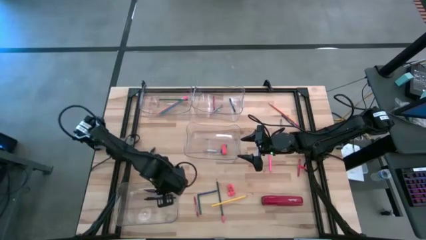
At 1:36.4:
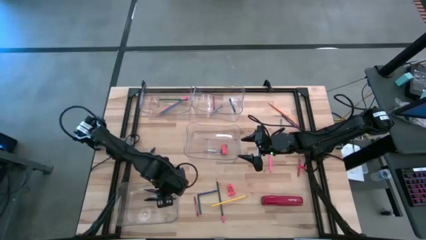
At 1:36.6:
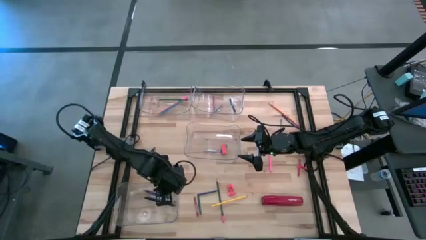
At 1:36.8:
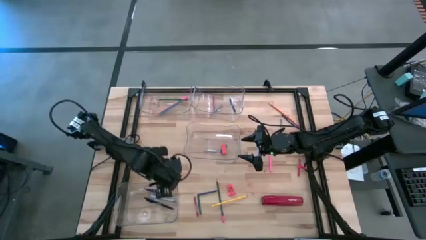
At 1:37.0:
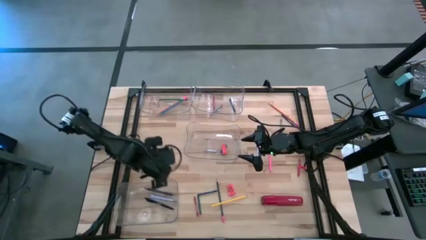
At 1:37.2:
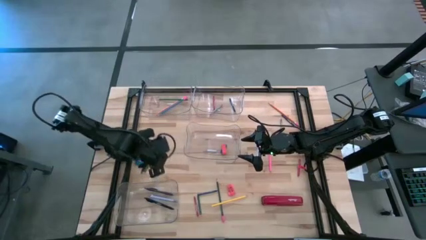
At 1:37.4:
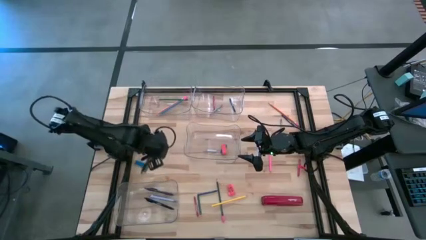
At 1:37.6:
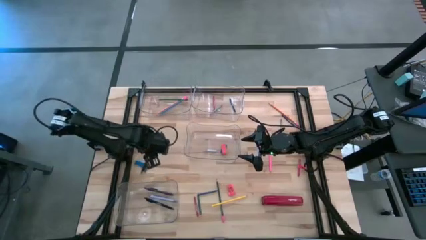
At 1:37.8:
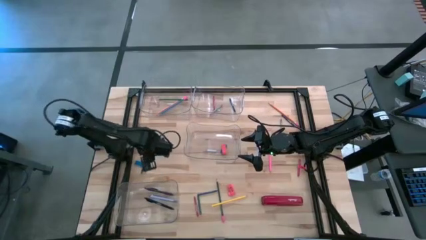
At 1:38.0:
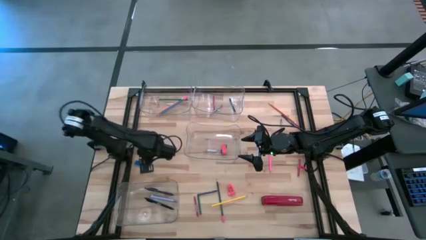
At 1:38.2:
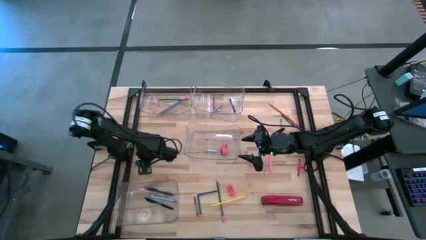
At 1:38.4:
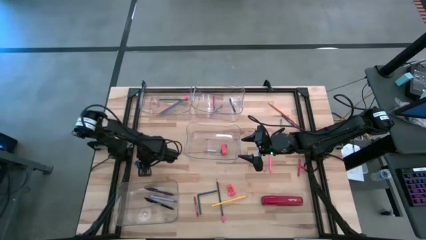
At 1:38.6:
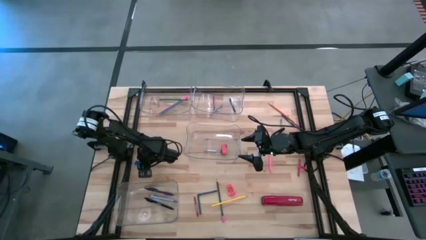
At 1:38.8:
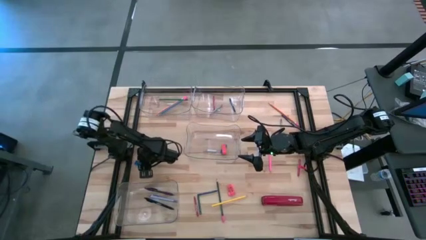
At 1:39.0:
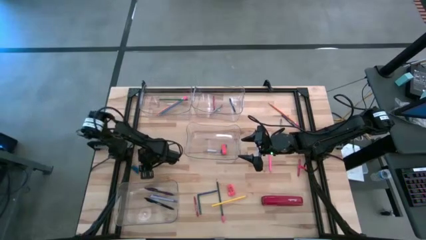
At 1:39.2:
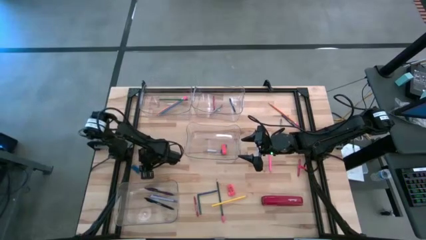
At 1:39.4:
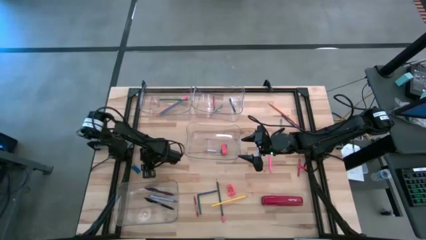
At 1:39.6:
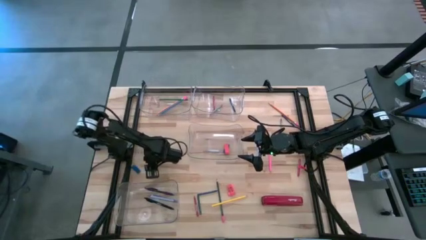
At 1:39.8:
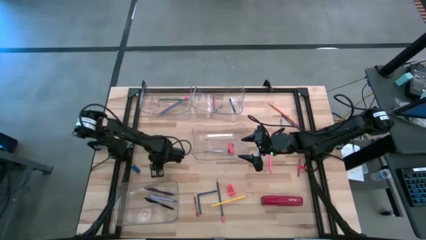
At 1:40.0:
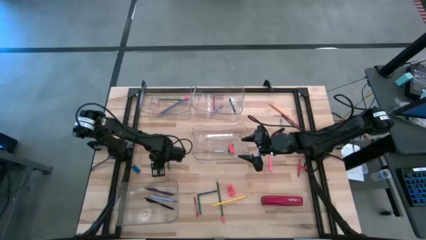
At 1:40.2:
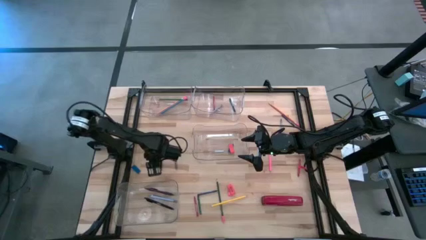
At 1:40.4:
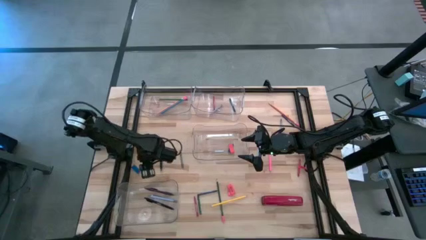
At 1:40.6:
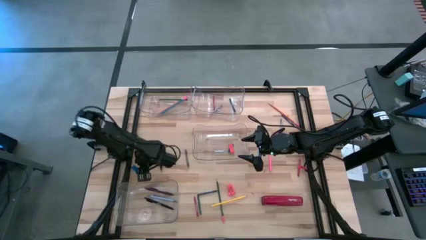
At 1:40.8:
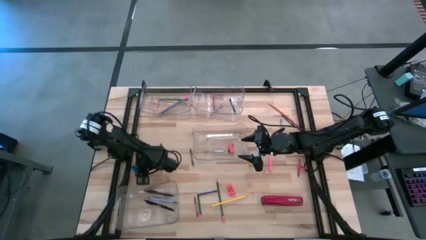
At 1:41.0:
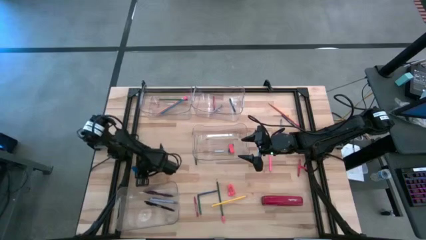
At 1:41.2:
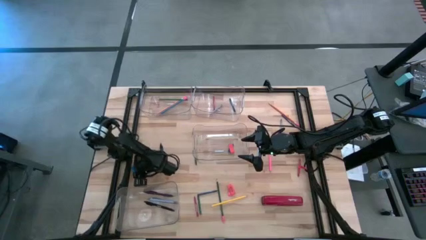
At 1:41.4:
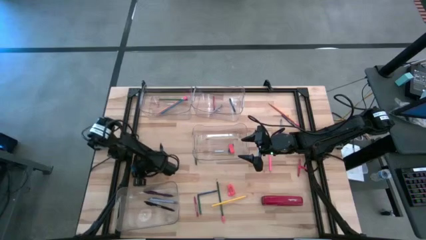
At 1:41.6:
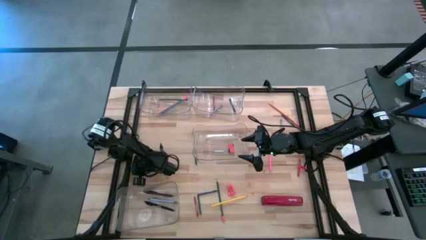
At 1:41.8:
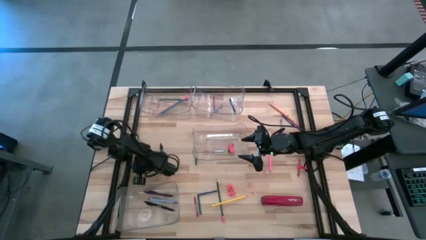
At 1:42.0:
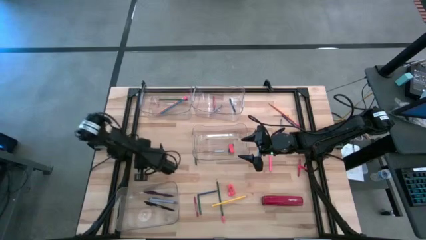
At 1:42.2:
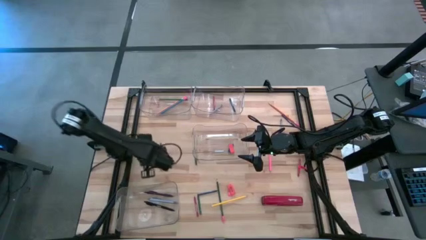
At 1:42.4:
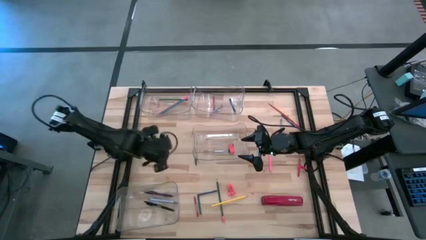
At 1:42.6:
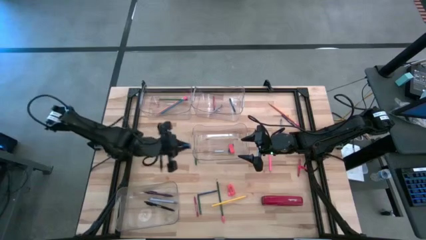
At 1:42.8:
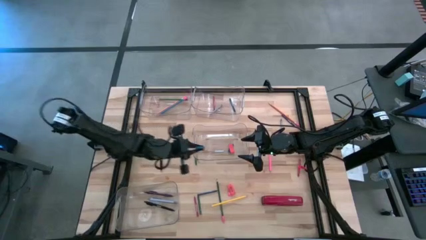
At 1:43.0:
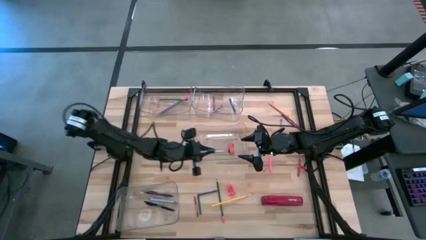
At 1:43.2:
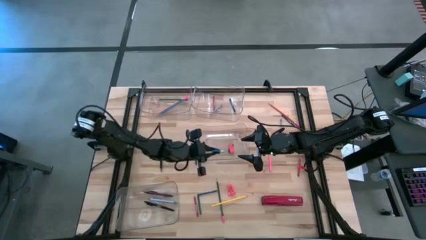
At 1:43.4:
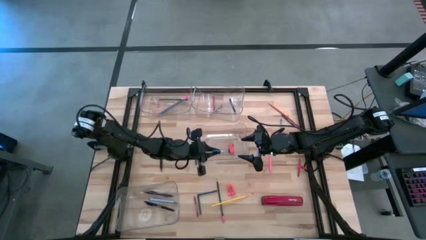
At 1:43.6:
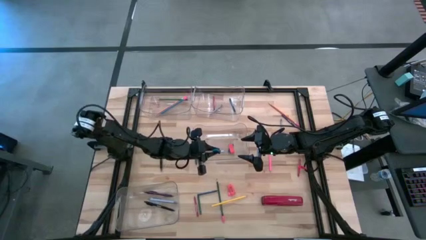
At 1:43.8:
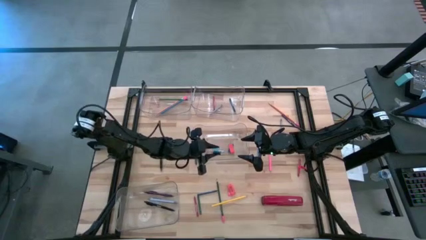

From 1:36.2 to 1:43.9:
Task: Sort crayons/erasers/pens/pencils in bins
Put the blue eraser into the middle transparent bin

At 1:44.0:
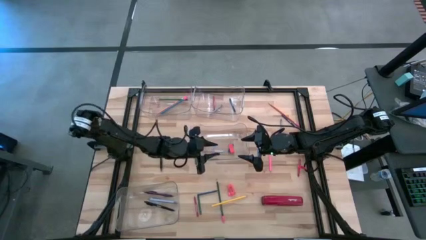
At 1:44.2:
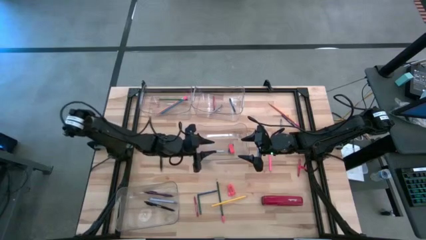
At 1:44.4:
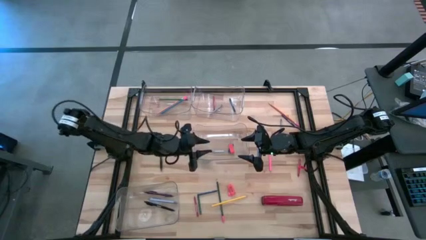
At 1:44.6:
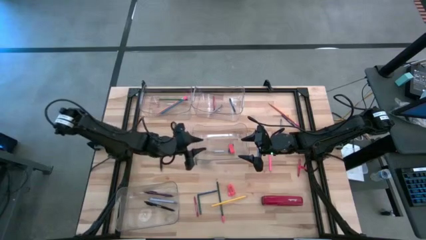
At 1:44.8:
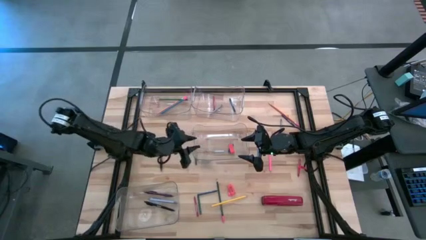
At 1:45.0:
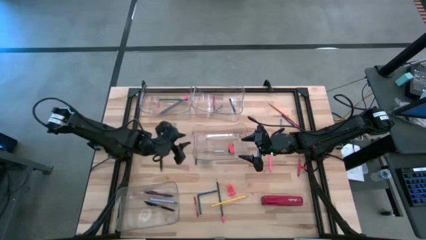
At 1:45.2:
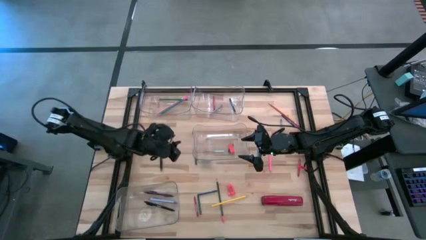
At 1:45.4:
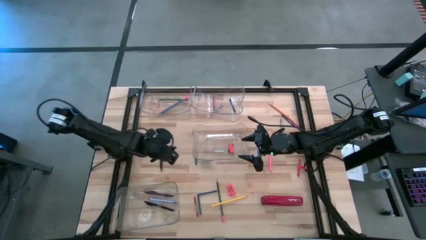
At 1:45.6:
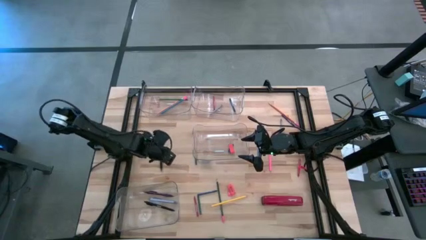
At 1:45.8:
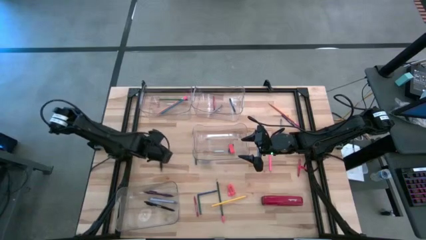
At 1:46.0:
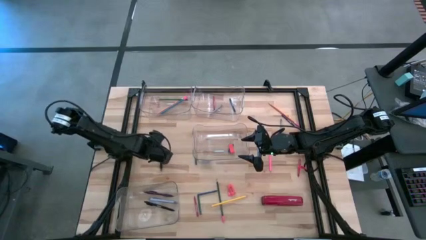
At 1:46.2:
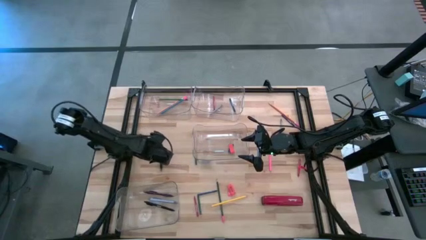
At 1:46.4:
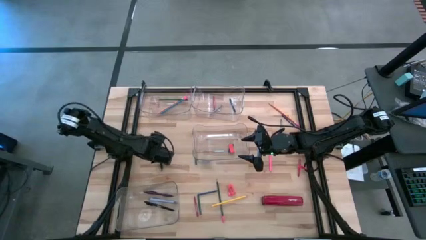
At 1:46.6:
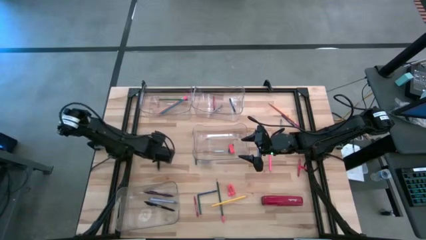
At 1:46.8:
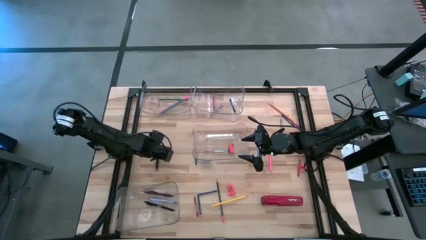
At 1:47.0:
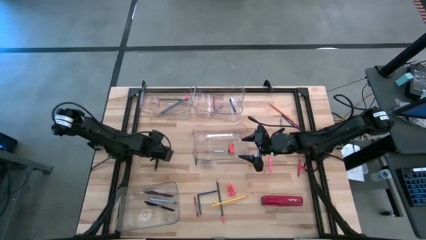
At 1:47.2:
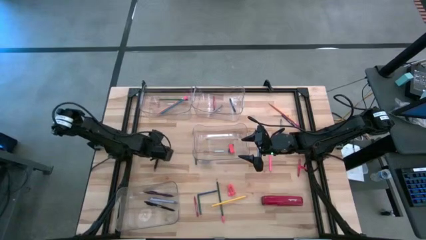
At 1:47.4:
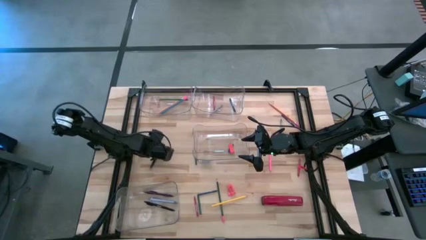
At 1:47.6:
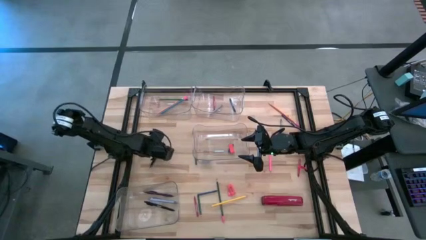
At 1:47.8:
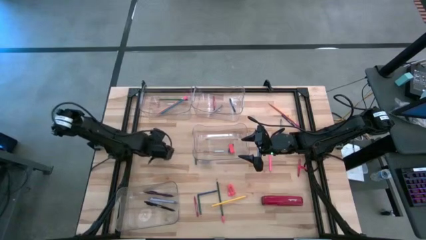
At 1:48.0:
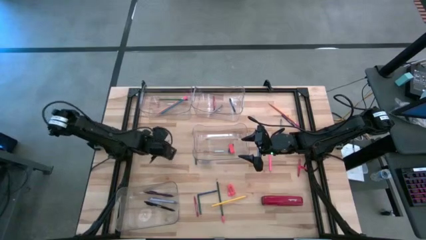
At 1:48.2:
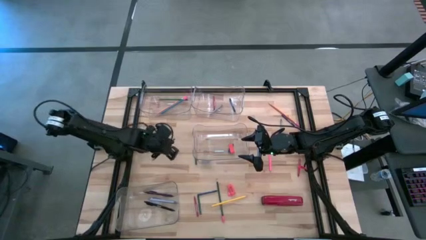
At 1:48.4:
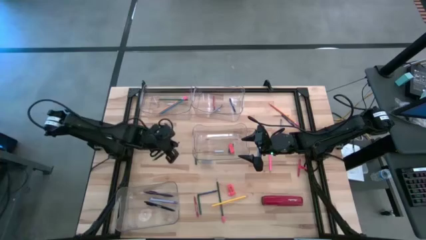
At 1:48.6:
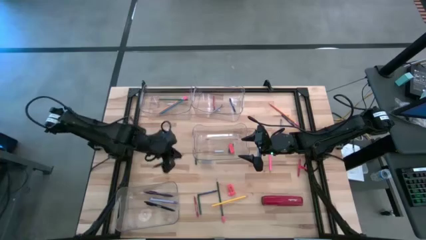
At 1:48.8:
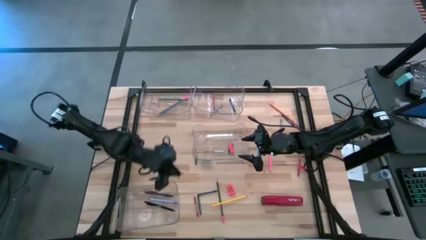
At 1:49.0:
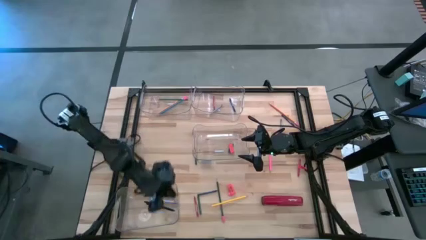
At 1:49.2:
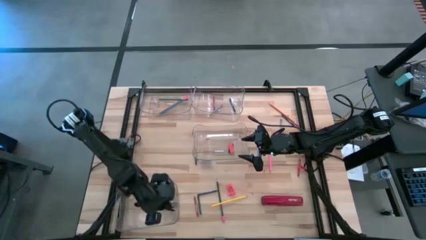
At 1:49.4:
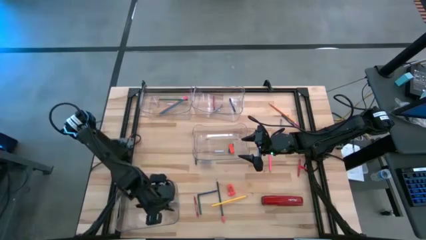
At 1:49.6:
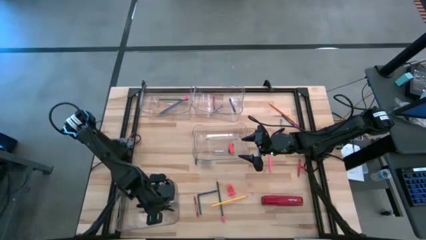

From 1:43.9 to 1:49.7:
Put the black pen into the bottom transparent bin
